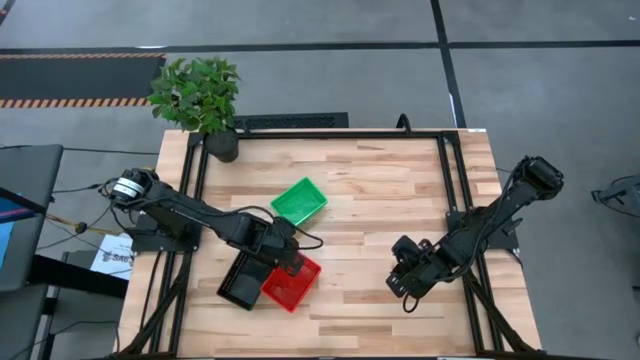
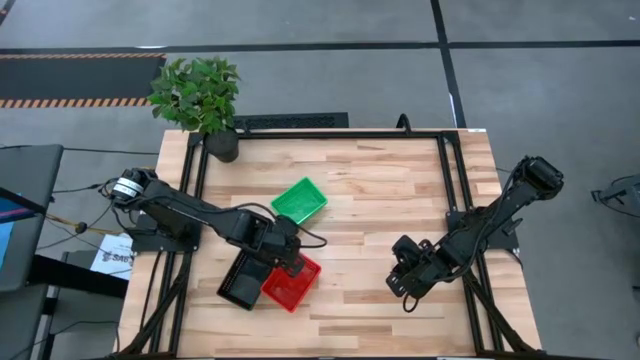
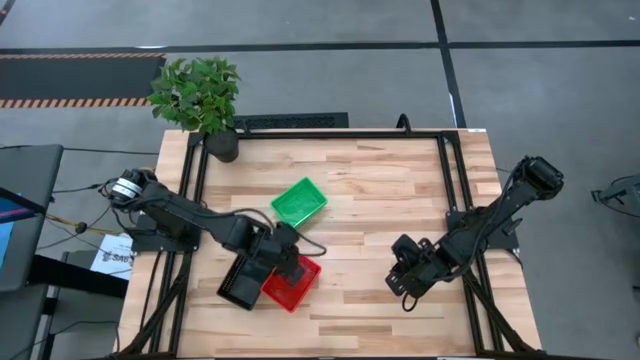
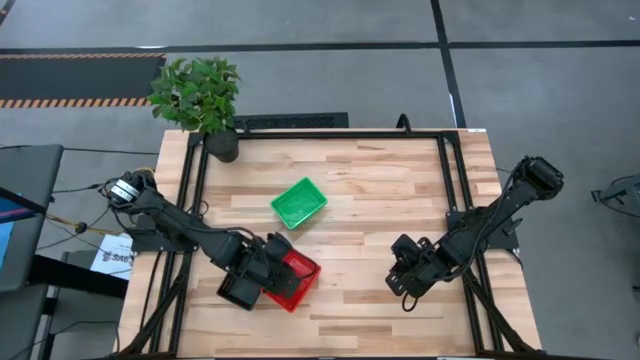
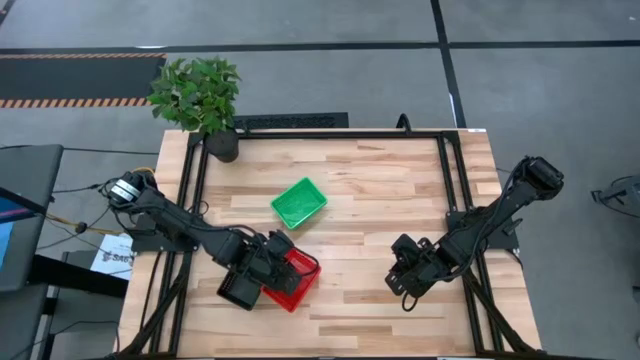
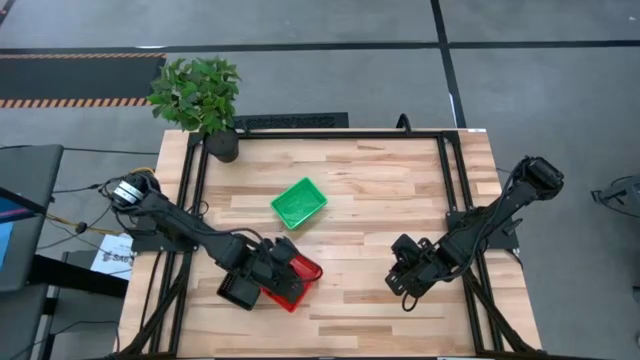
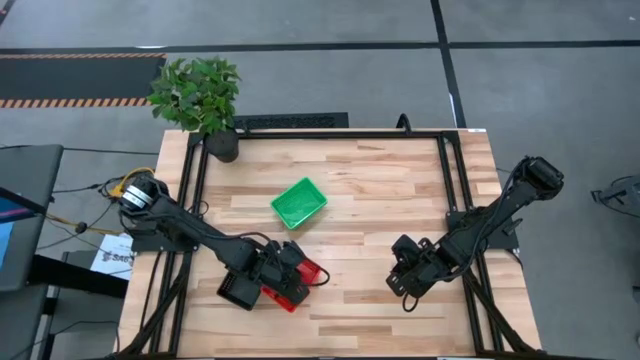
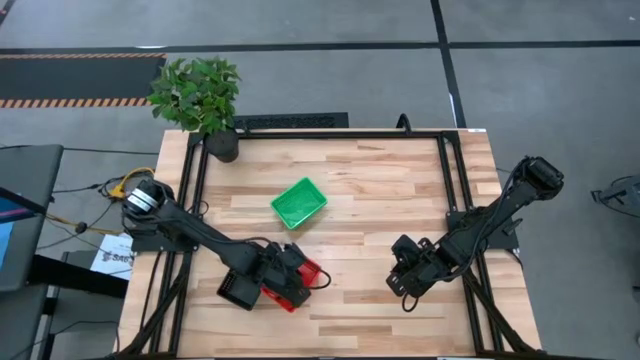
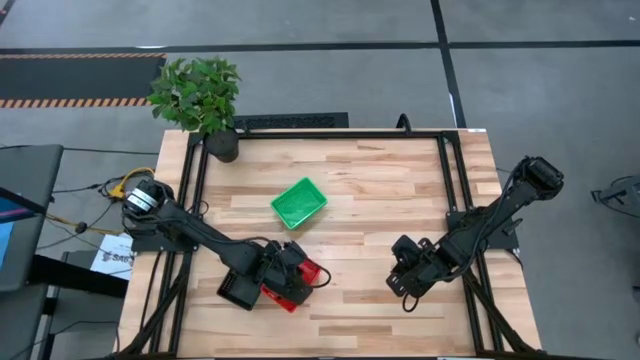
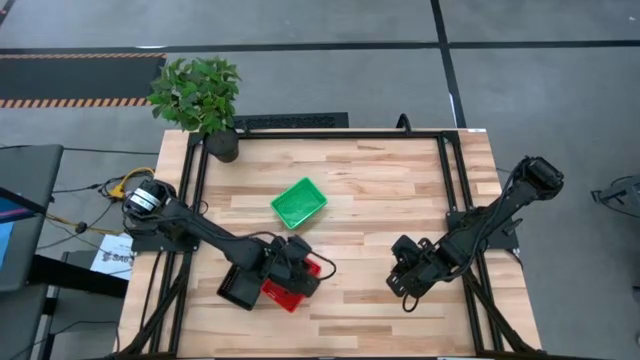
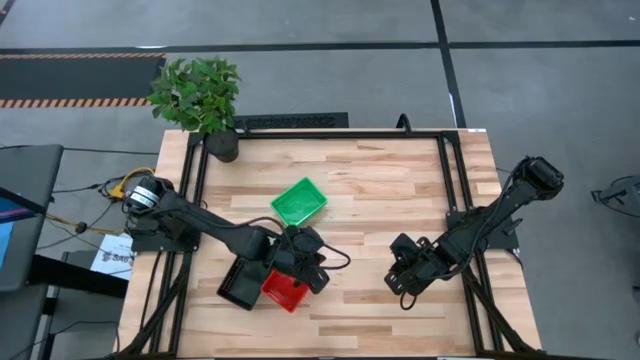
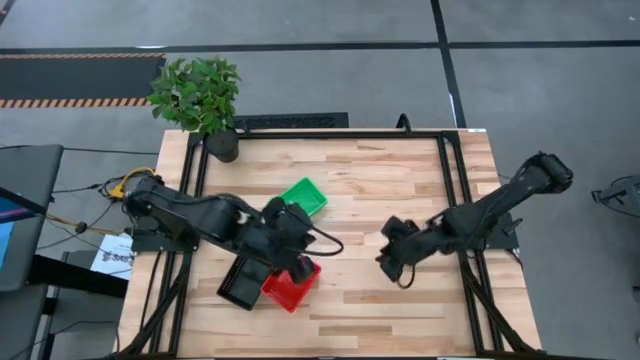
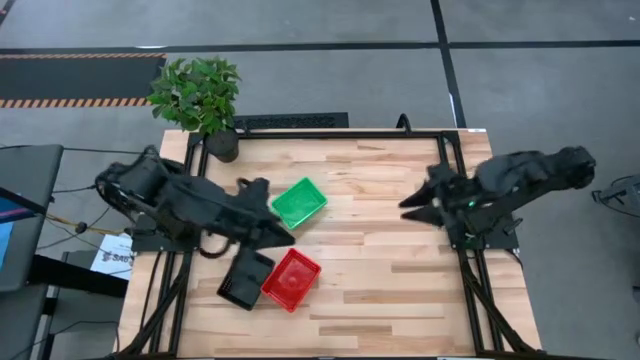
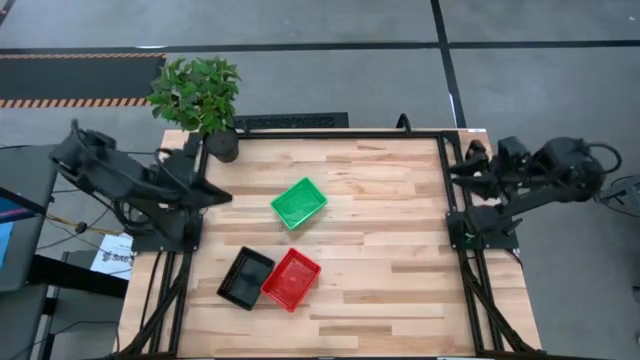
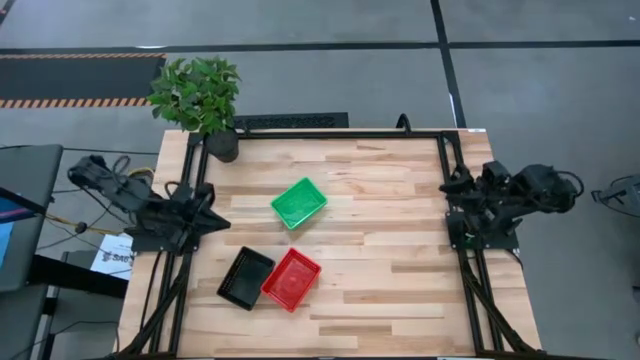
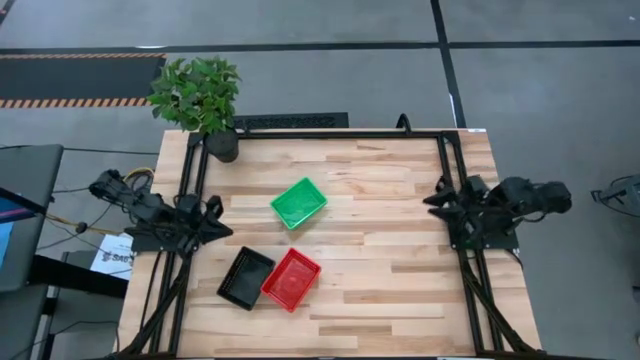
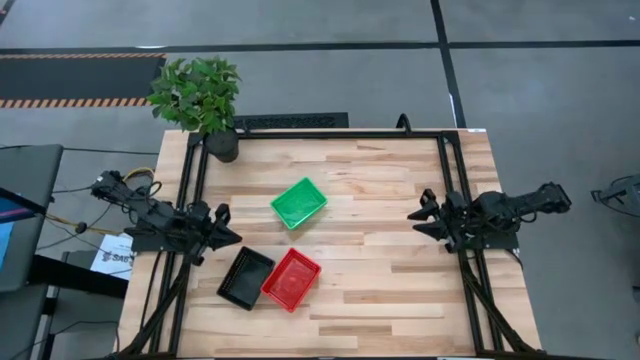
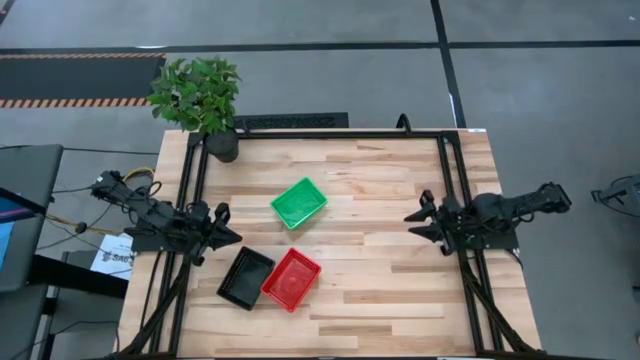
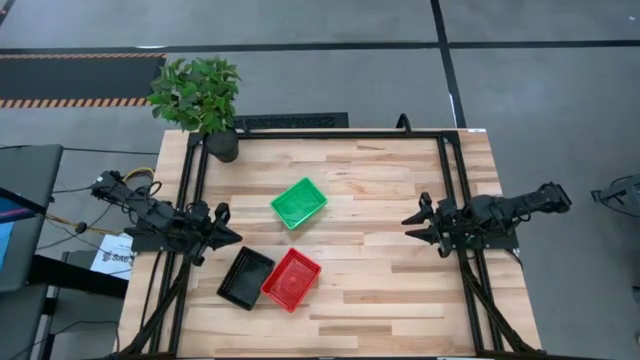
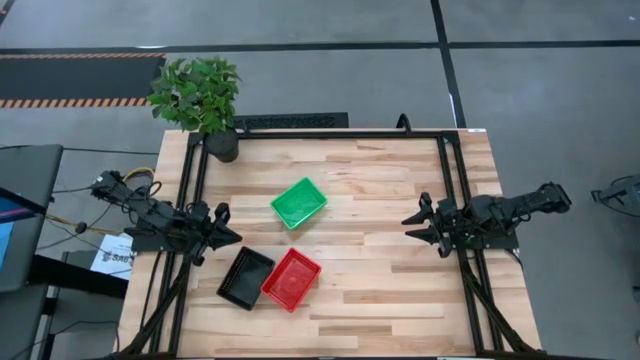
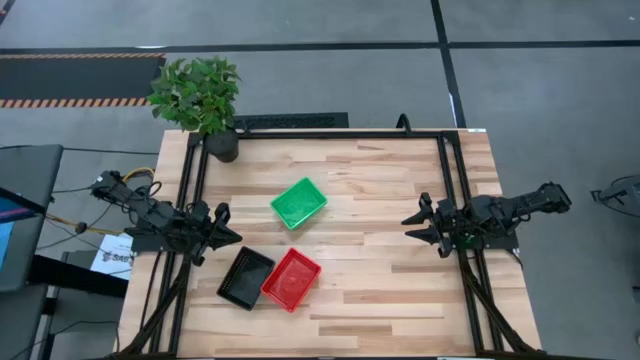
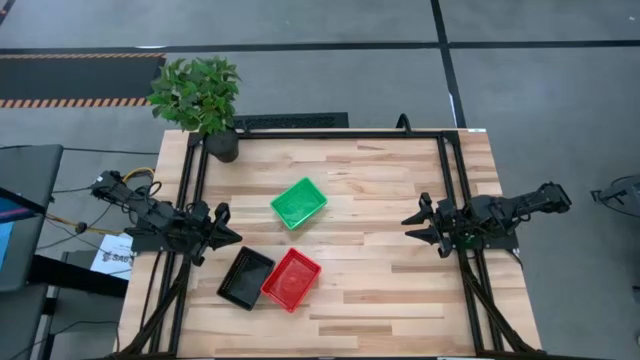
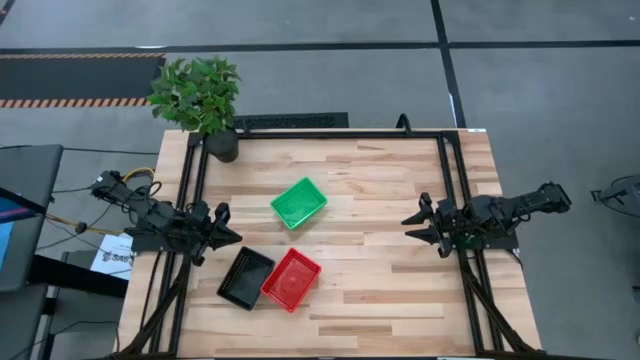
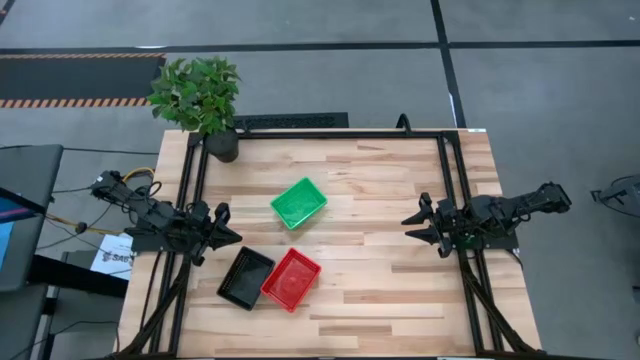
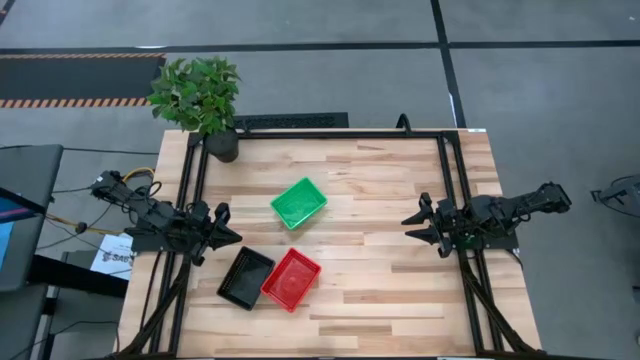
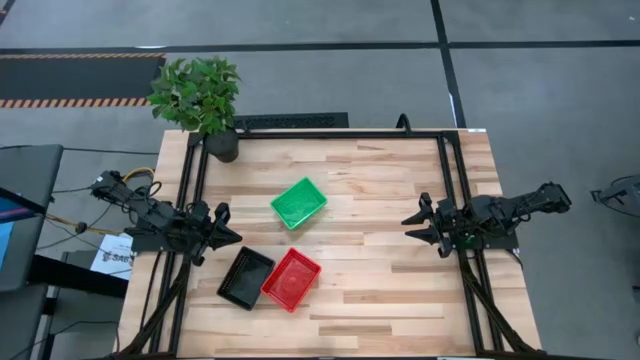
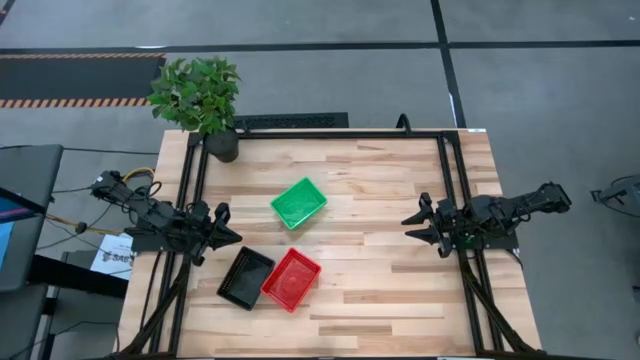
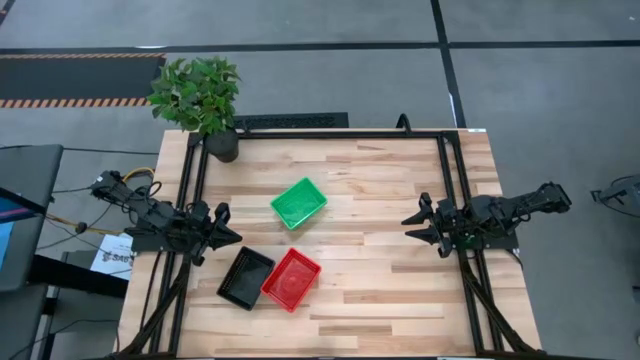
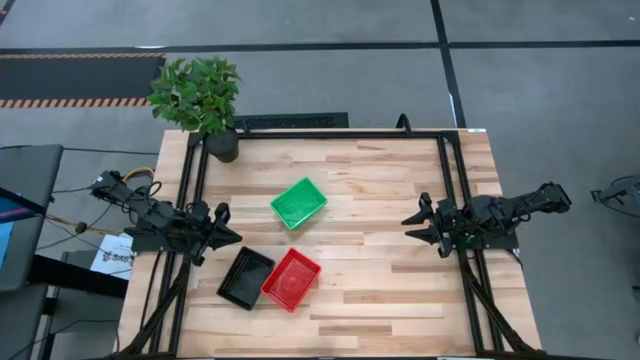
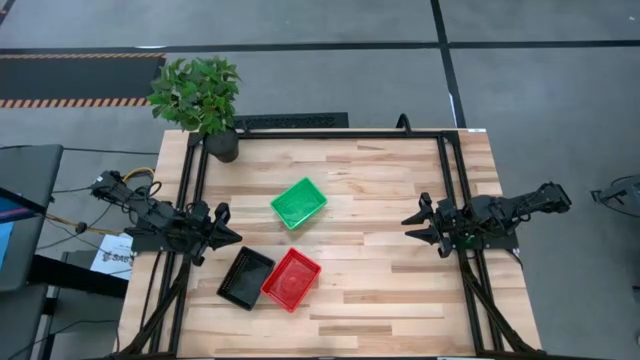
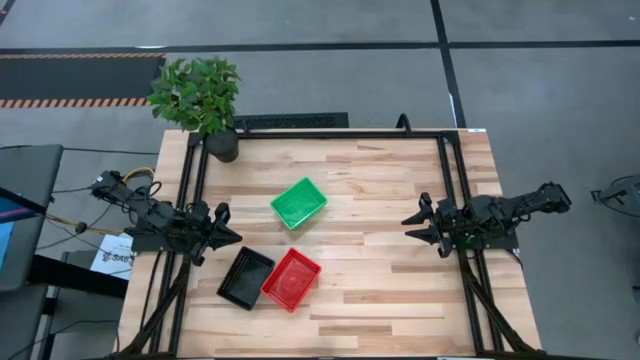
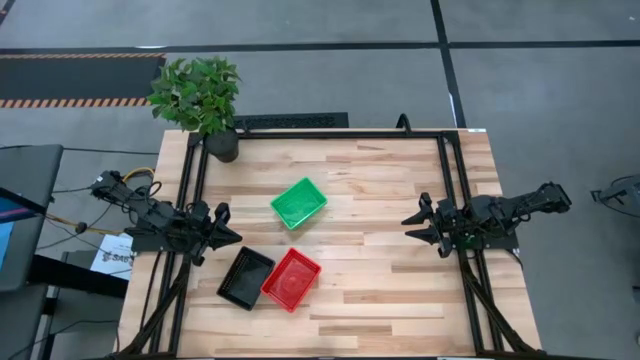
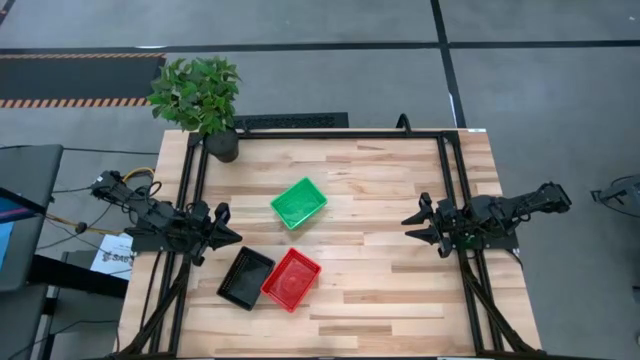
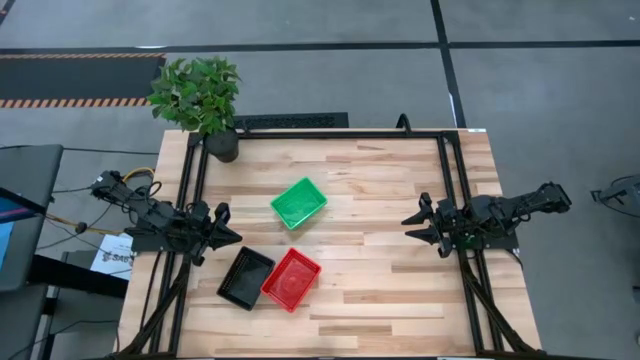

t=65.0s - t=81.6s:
Return to Home Position
